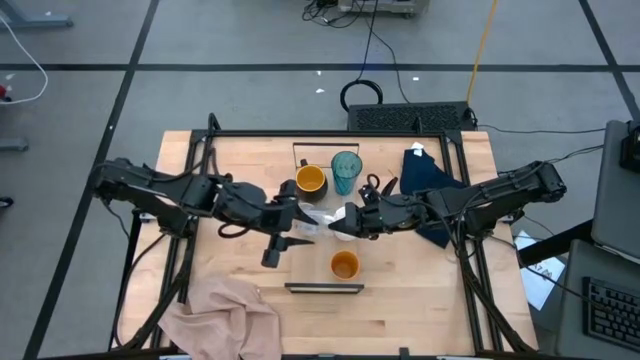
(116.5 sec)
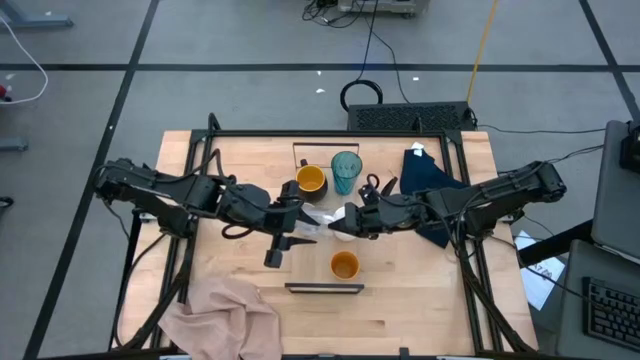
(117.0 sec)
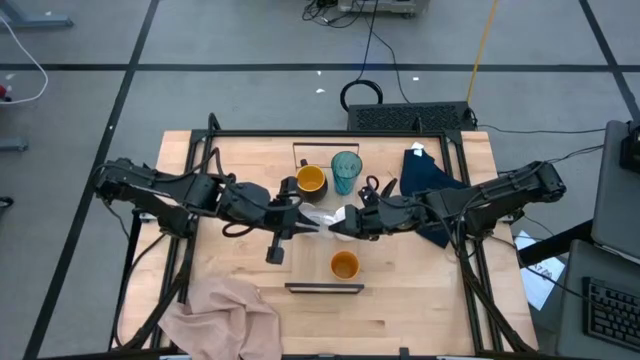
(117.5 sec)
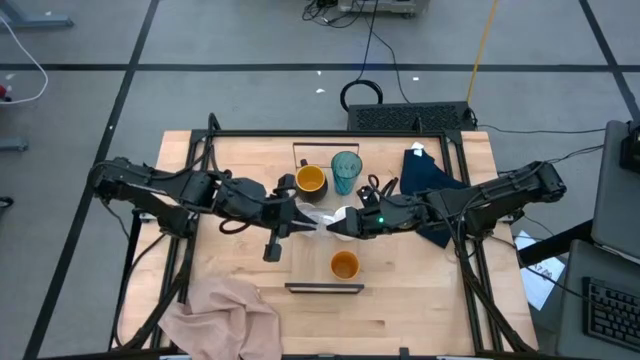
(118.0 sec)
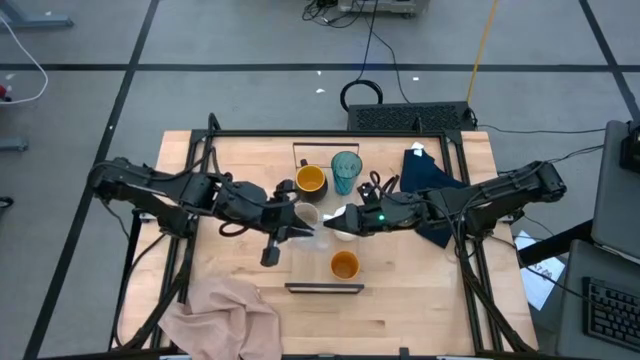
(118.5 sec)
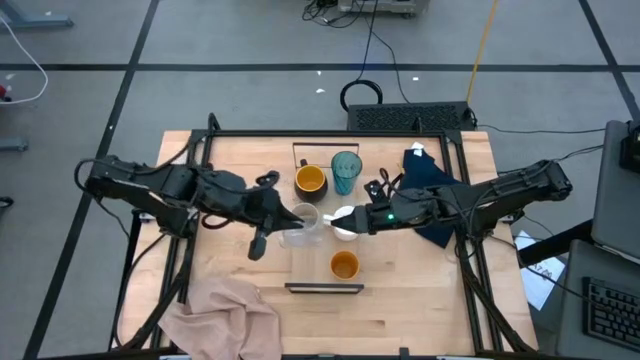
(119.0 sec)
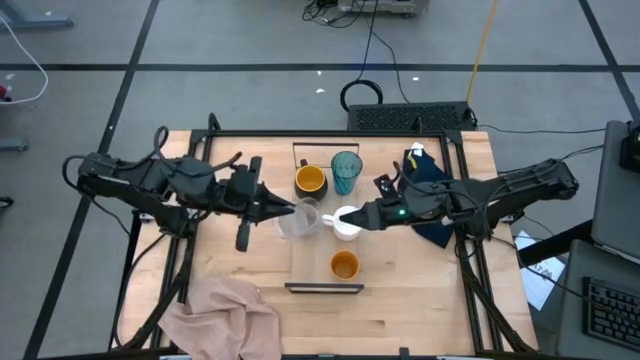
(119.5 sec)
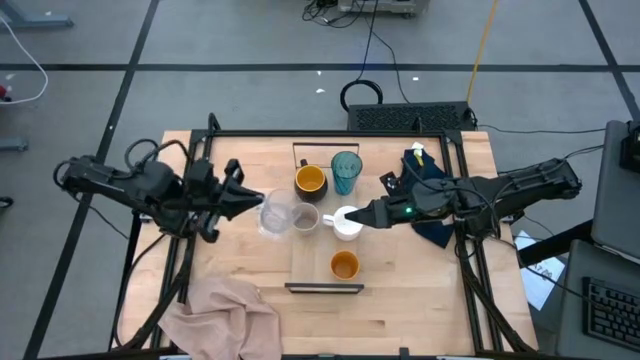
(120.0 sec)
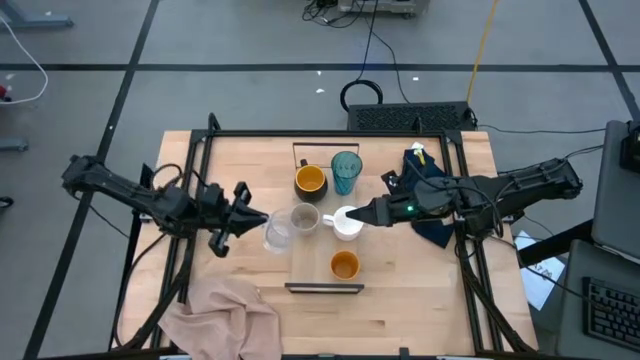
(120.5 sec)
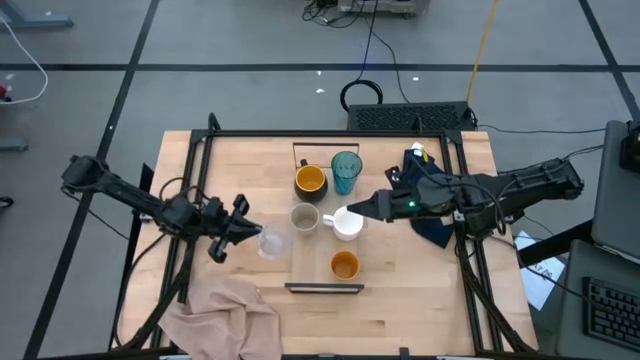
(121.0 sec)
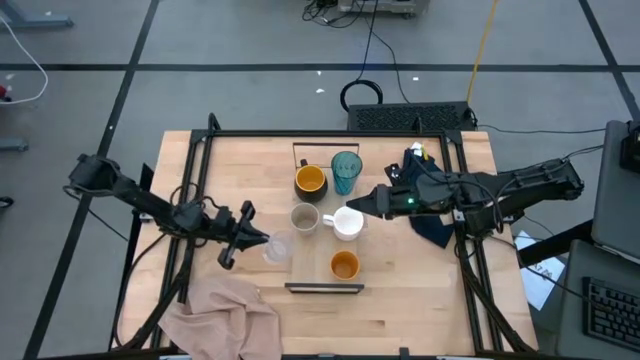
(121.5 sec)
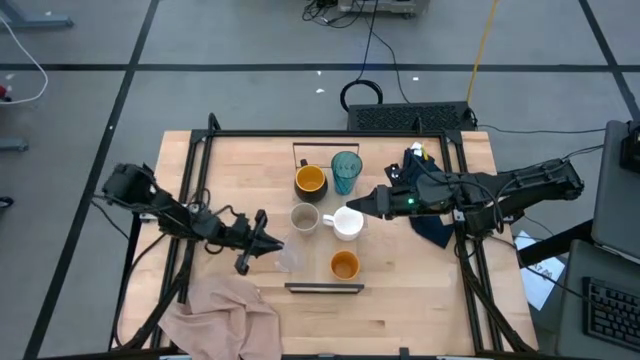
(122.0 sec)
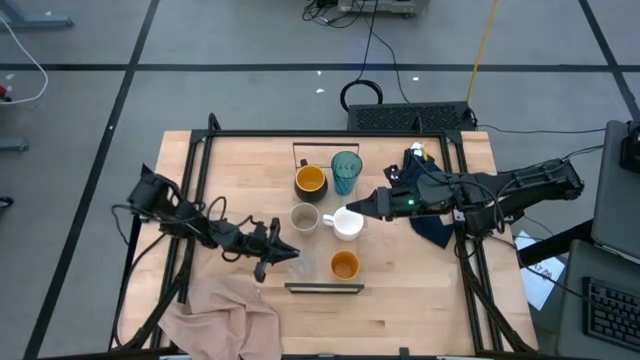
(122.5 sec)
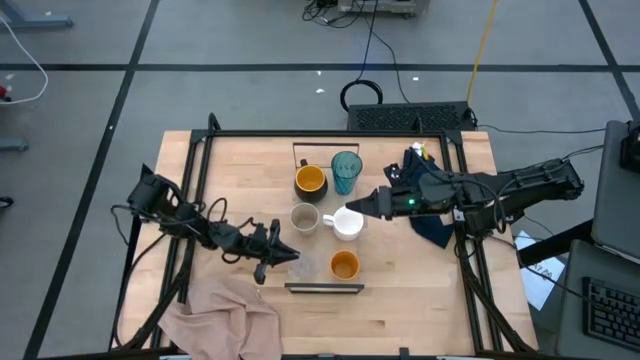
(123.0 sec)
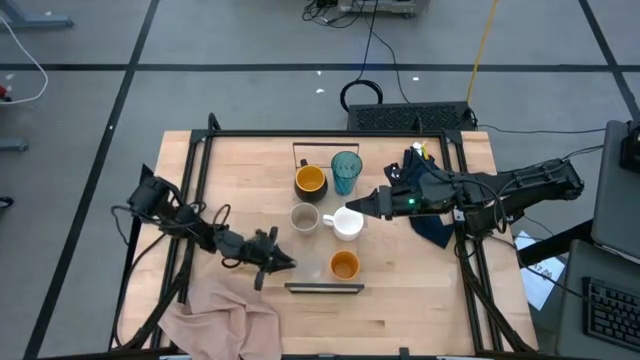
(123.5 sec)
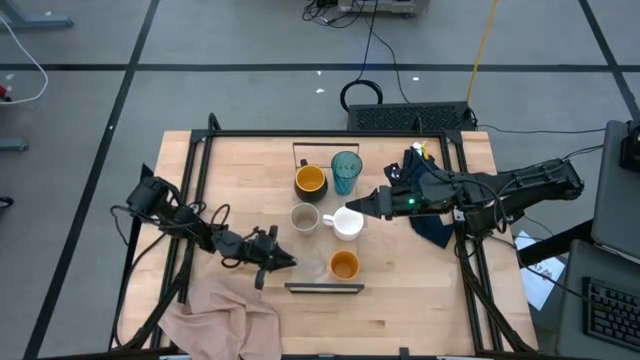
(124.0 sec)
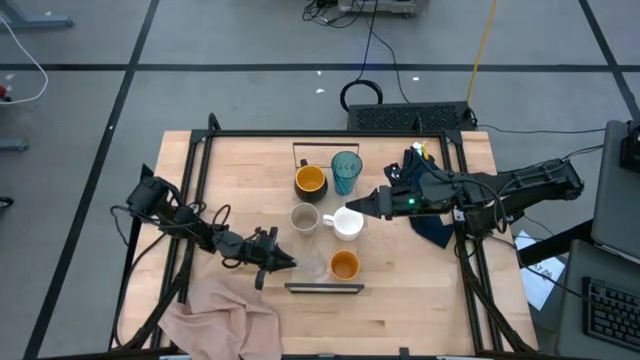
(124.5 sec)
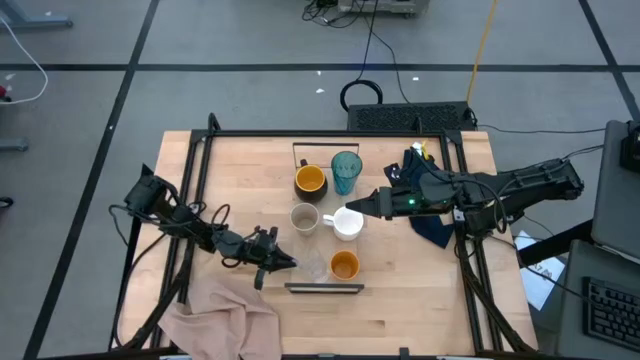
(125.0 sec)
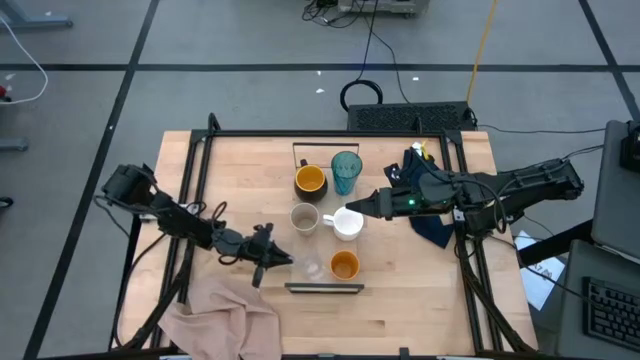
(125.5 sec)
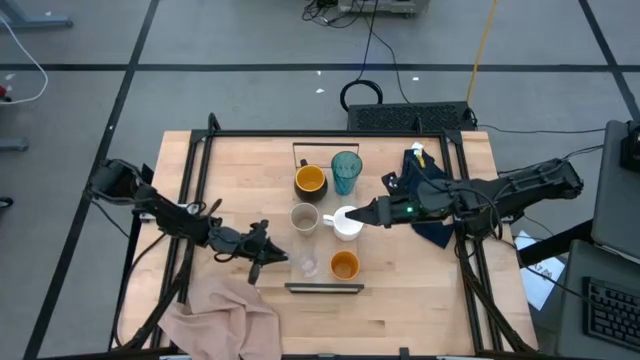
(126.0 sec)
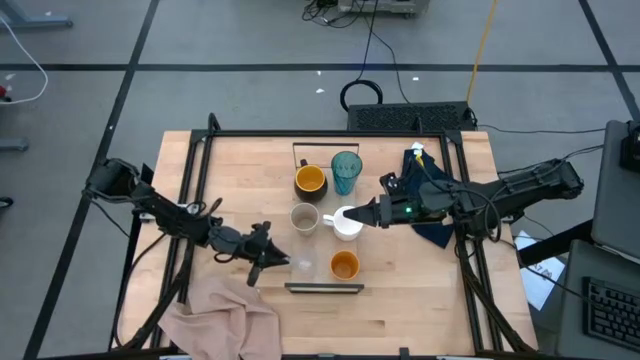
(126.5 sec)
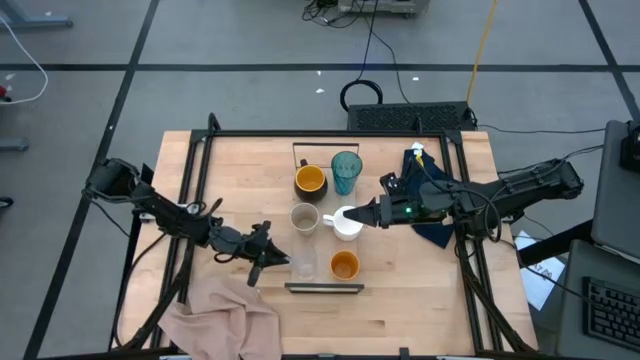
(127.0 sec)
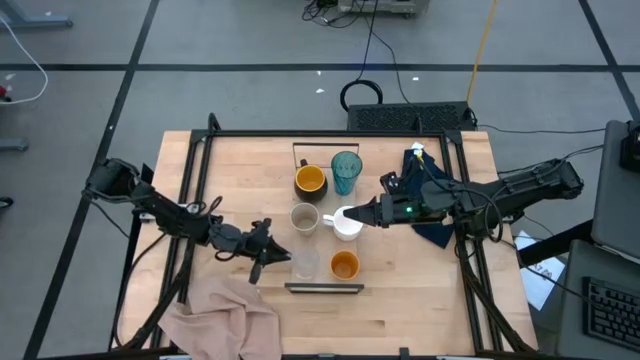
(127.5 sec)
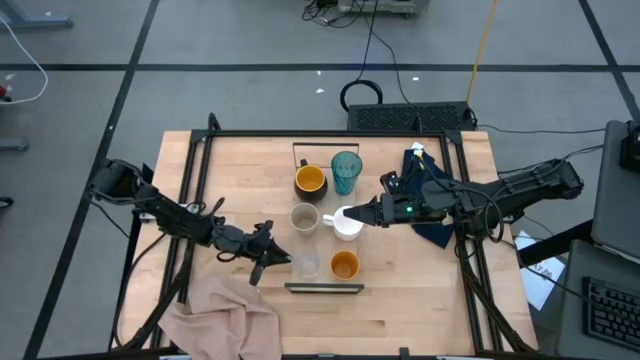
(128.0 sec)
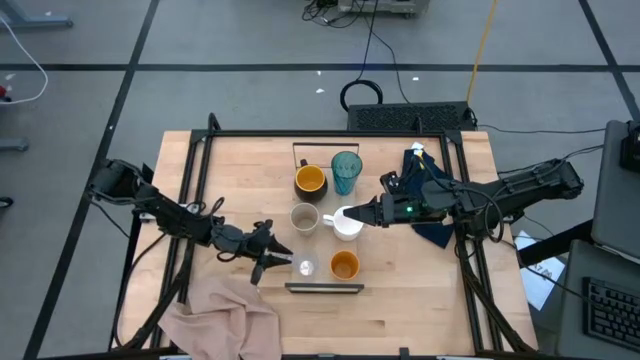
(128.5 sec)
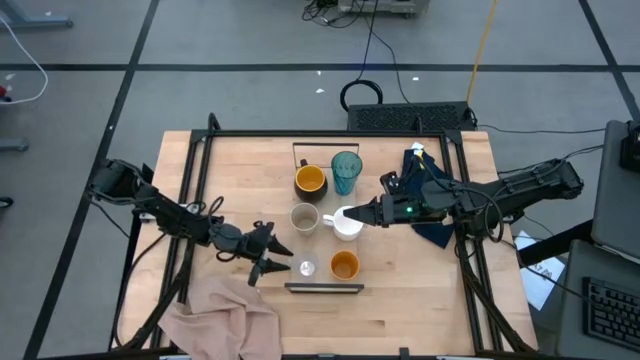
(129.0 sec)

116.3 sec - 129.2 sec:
Task: Stack small to large cups/mugs on shelf
Put the transparent mug on the shelf

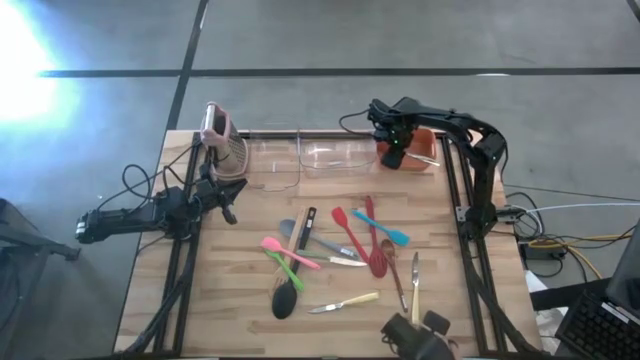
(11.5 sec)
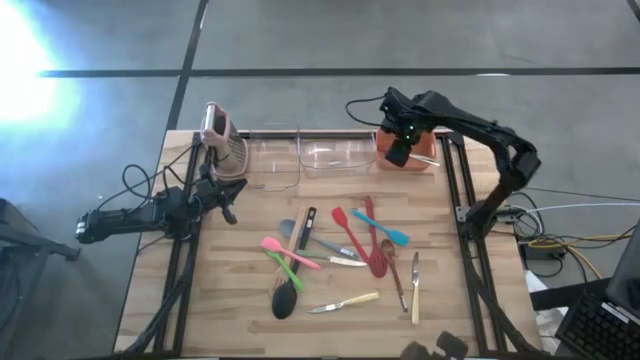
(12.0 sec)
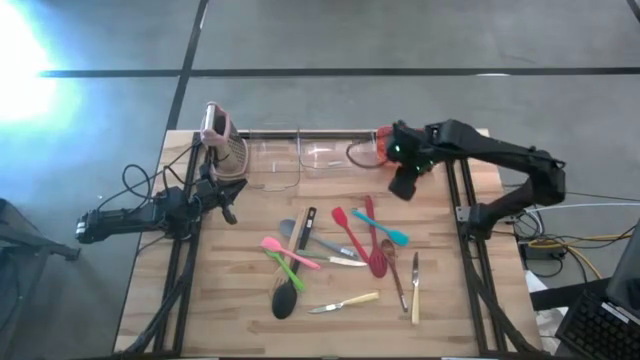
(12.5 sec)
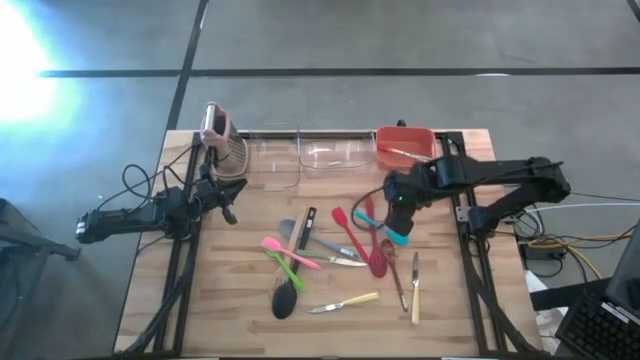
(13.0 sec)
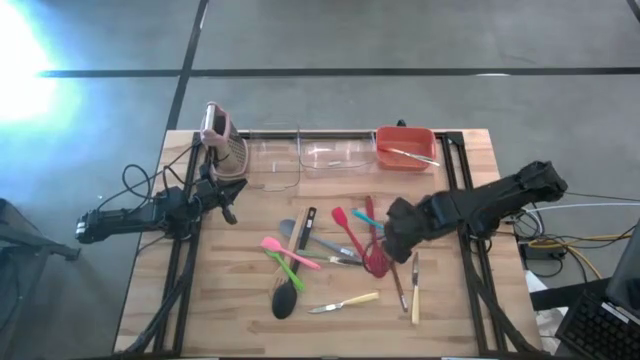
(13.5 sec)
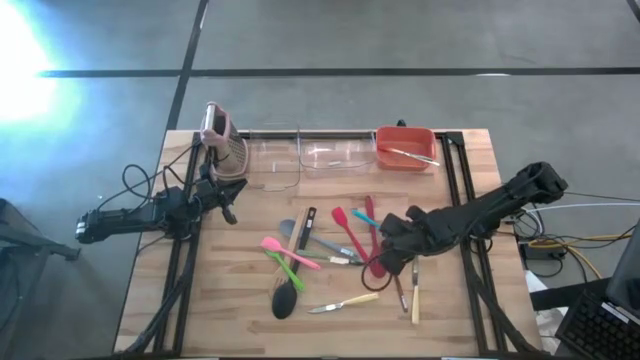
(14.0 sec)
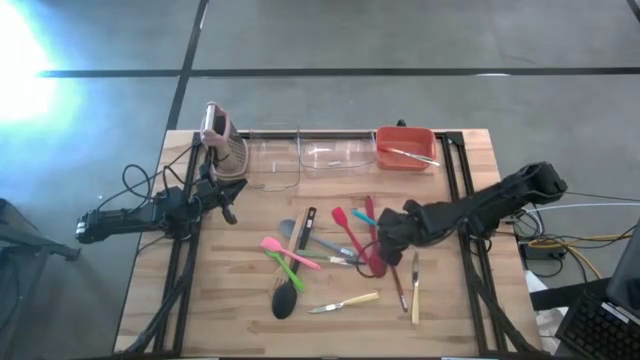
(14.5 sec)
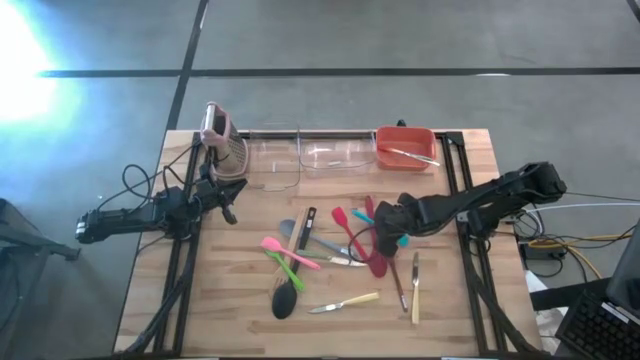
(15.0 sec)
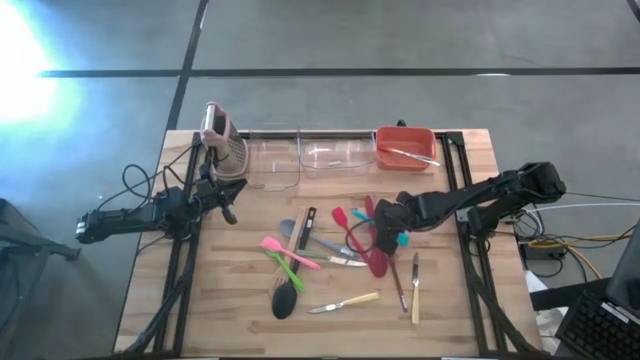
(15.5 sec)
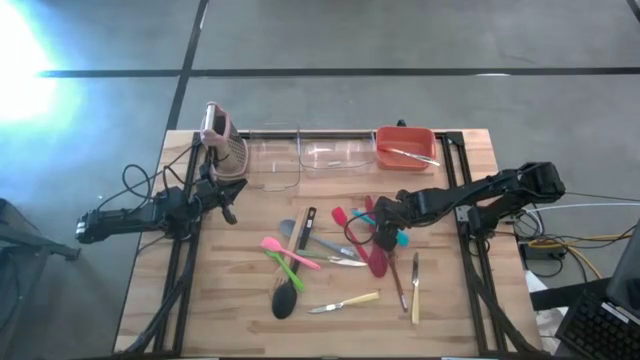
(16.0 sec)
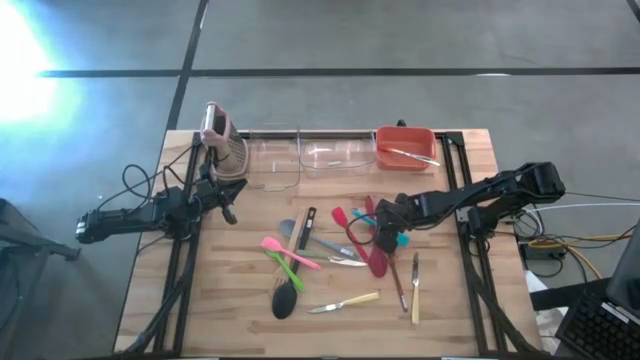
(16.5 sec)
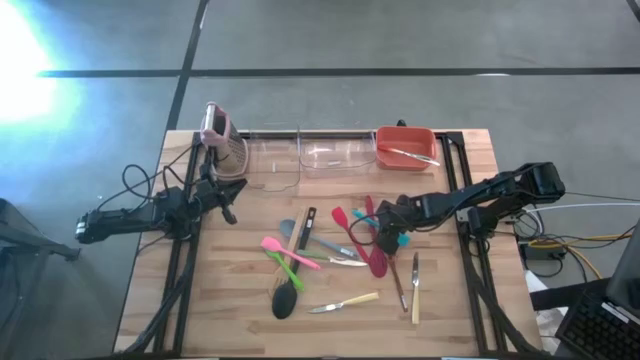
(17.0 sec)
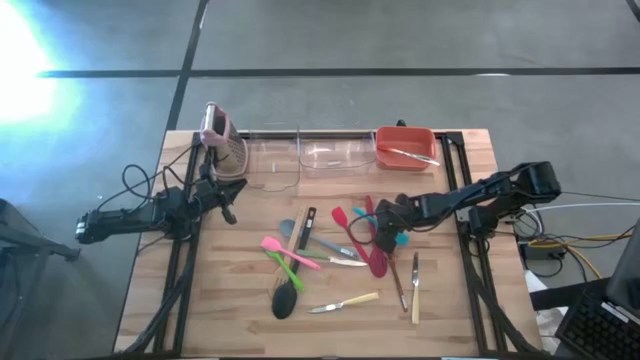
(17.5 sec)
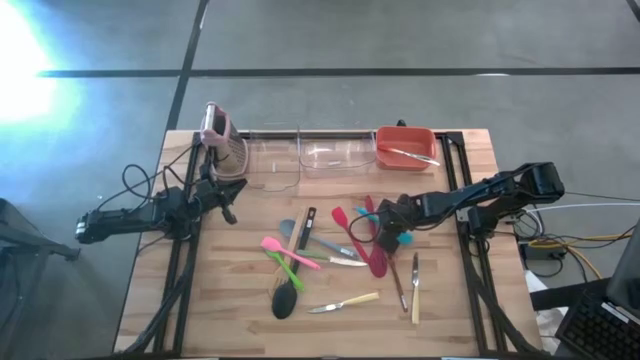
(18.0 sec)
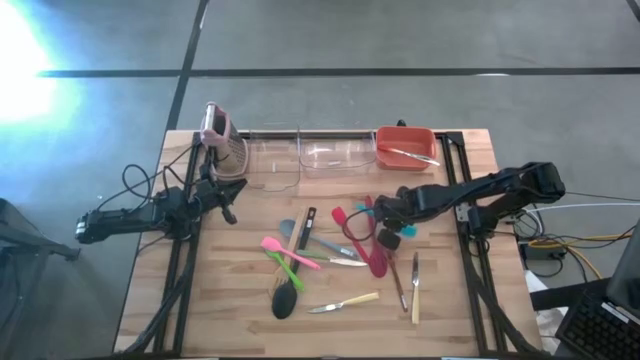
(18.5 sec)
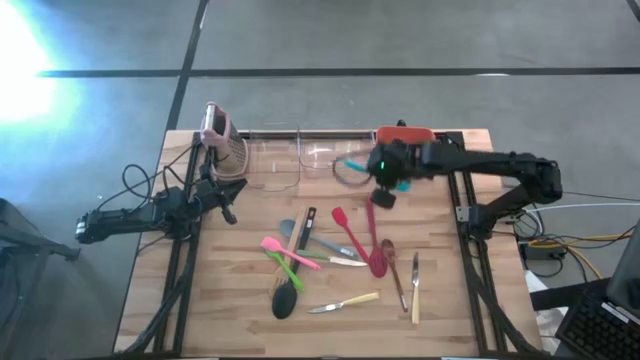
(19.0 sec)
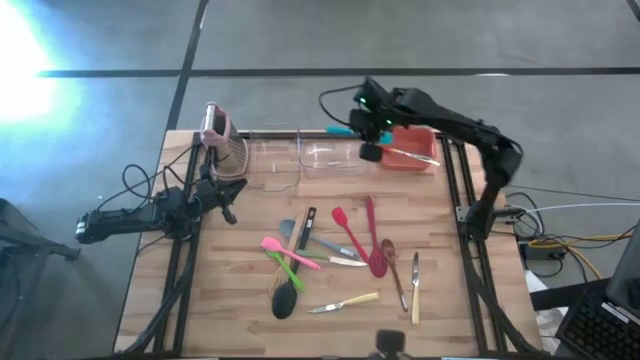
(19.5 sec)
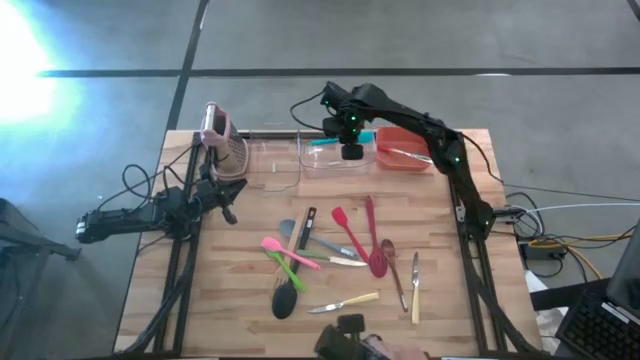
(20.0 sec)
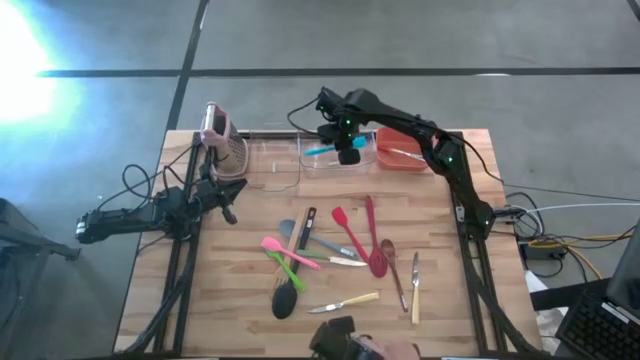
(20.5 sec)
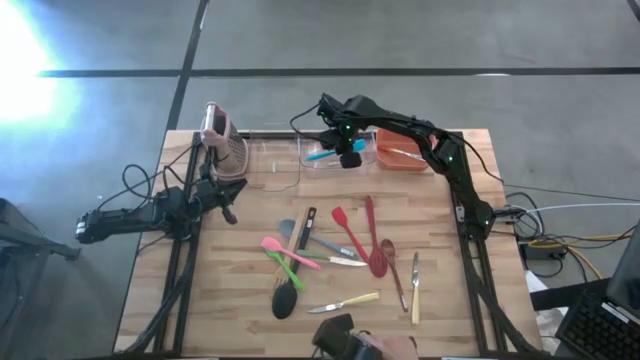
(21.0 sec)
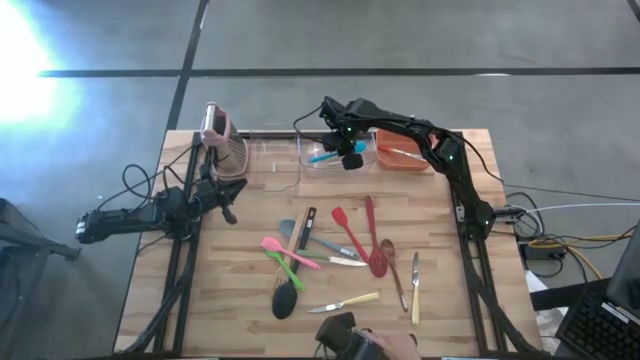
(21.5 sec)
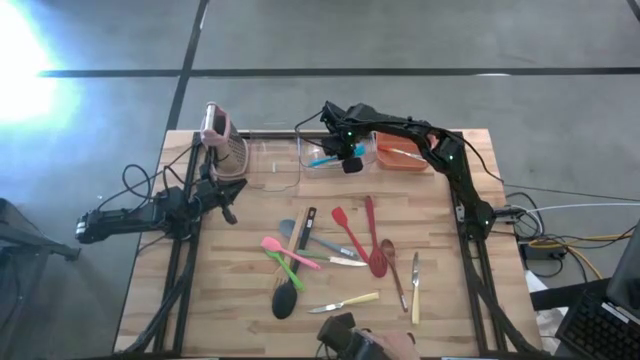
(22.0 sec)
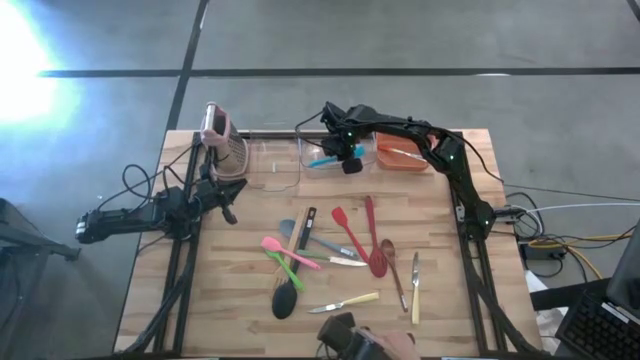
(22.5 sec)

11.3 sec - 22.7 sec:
Task: Pick & Place Kitchen Items
Put the blue spatula into the right transparent bin
